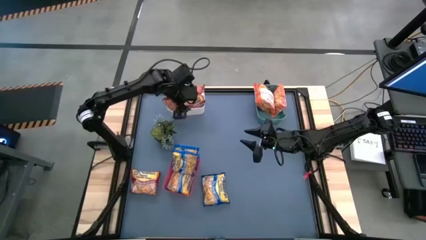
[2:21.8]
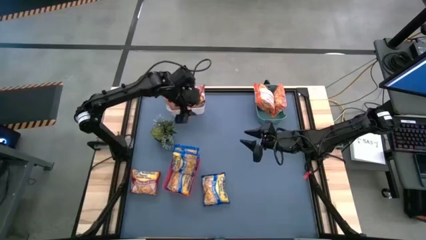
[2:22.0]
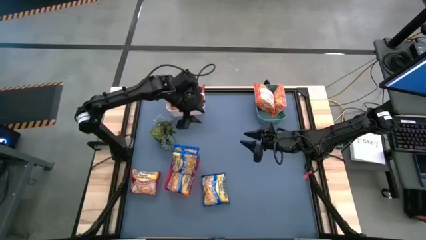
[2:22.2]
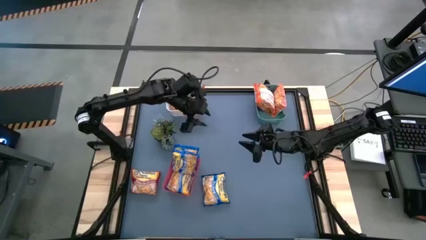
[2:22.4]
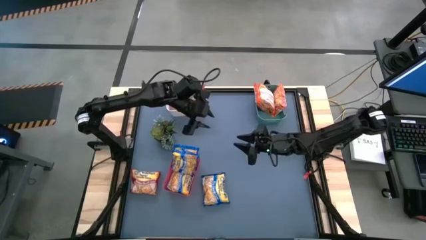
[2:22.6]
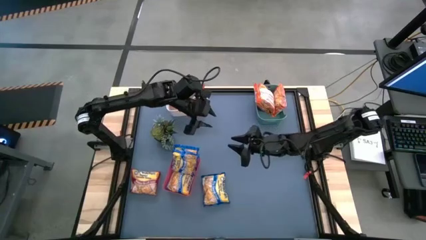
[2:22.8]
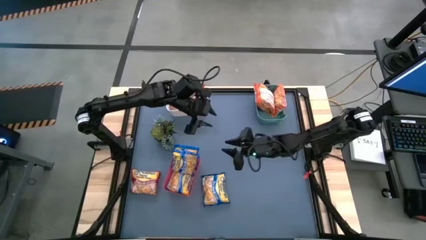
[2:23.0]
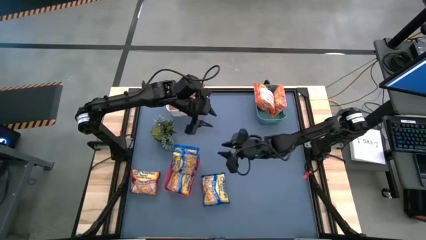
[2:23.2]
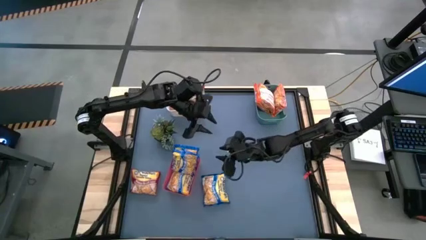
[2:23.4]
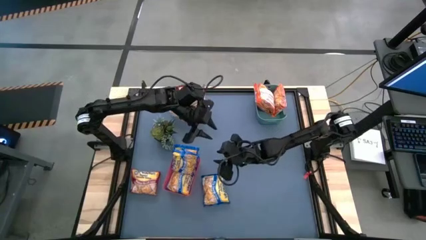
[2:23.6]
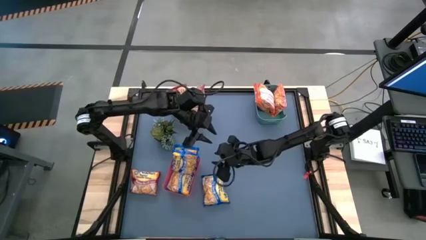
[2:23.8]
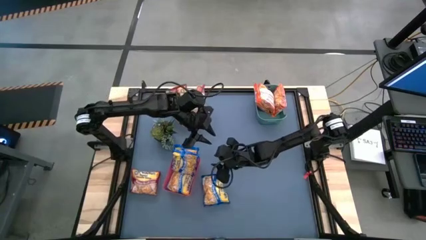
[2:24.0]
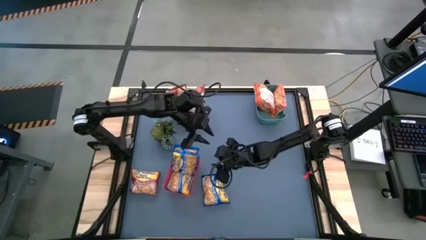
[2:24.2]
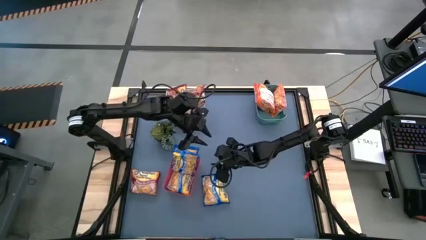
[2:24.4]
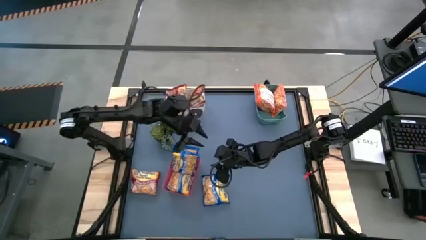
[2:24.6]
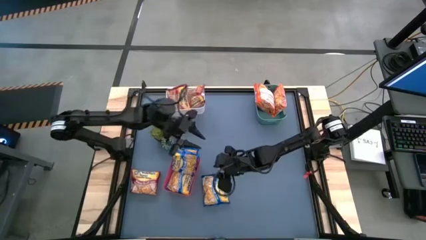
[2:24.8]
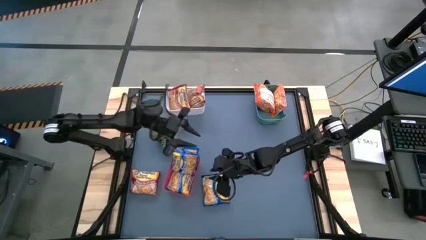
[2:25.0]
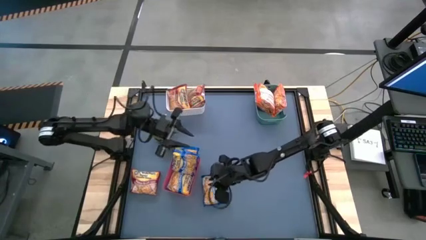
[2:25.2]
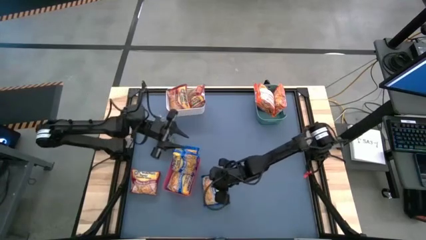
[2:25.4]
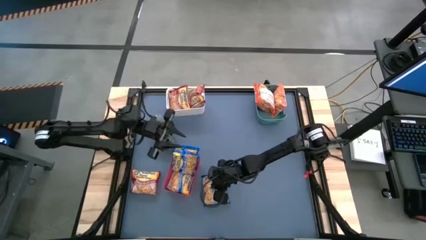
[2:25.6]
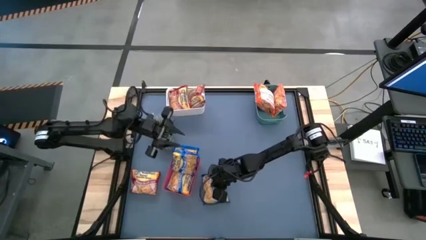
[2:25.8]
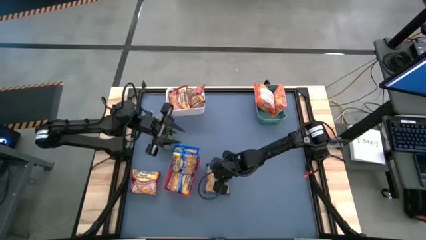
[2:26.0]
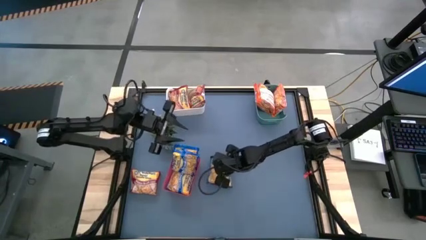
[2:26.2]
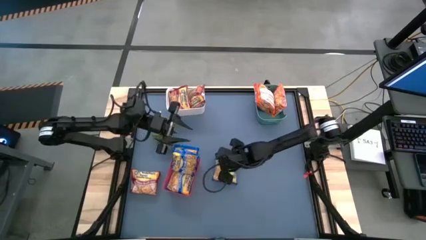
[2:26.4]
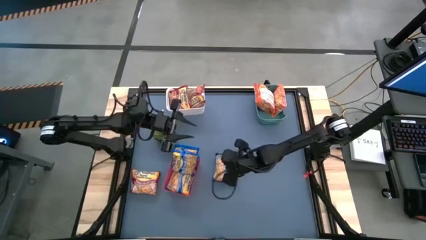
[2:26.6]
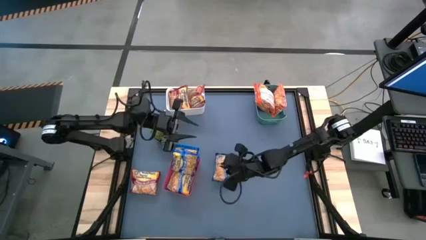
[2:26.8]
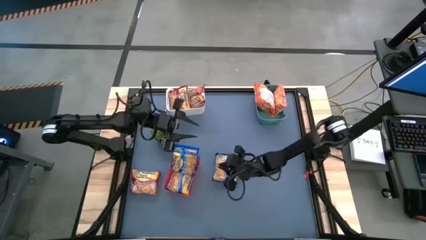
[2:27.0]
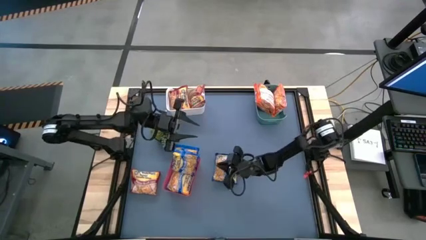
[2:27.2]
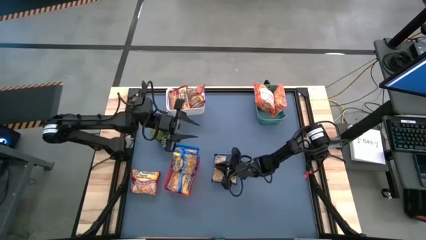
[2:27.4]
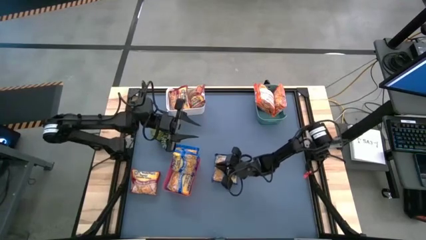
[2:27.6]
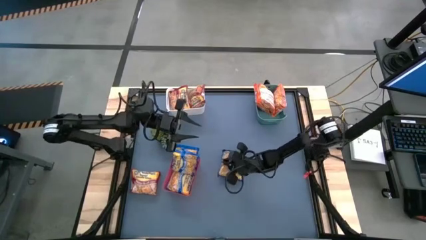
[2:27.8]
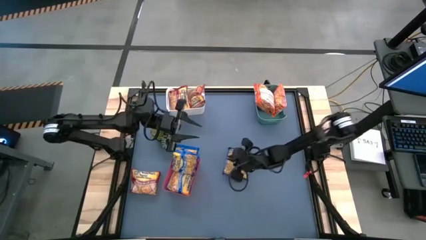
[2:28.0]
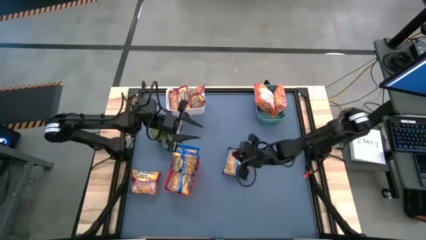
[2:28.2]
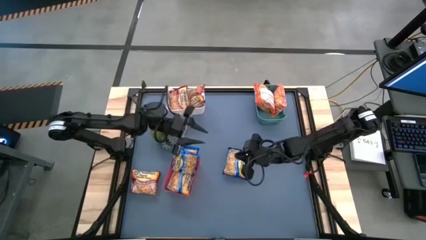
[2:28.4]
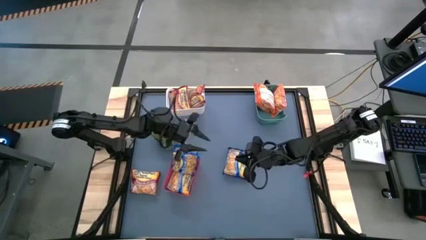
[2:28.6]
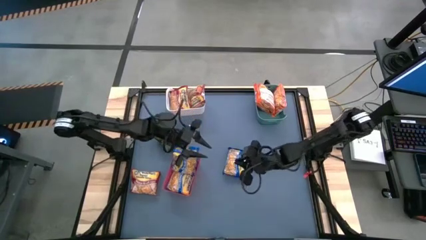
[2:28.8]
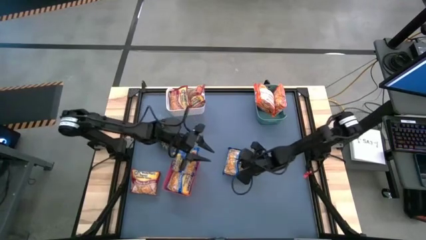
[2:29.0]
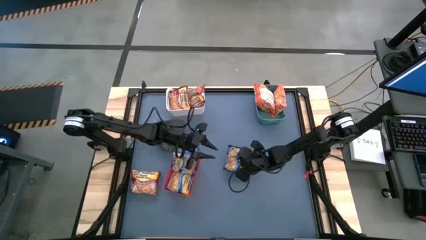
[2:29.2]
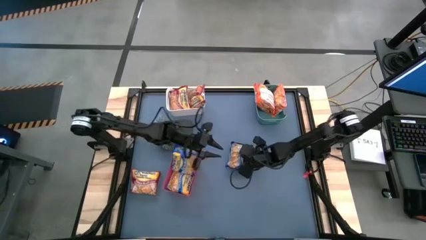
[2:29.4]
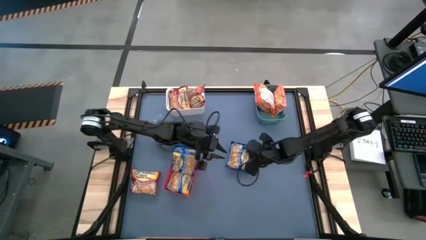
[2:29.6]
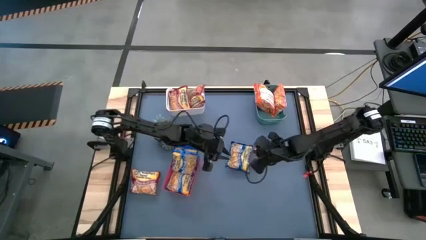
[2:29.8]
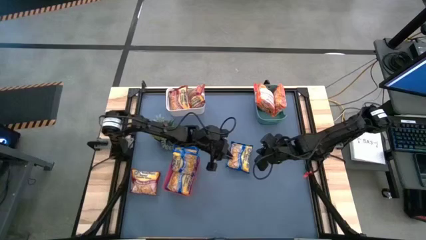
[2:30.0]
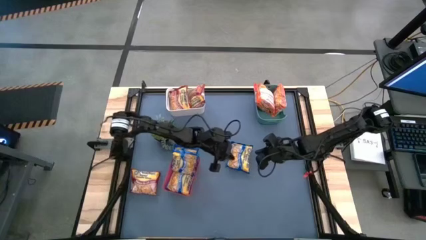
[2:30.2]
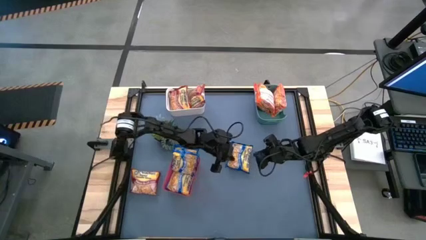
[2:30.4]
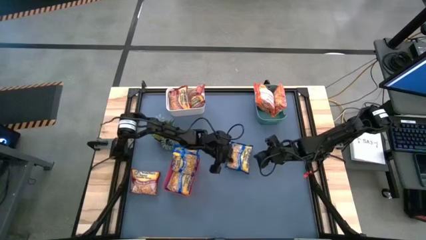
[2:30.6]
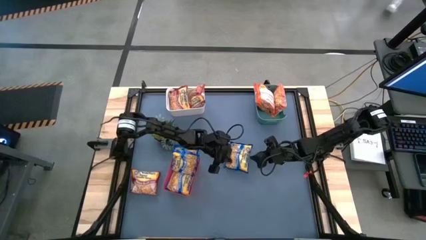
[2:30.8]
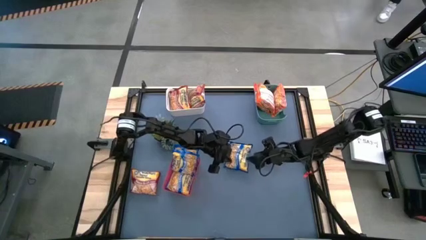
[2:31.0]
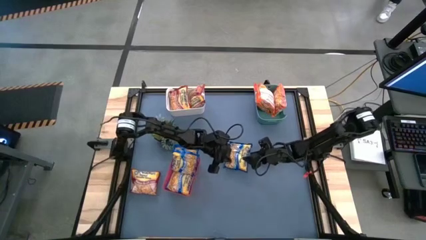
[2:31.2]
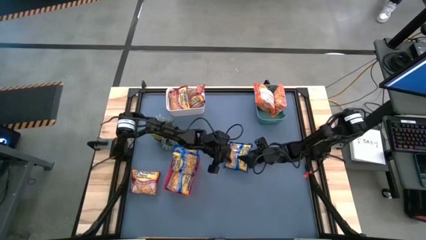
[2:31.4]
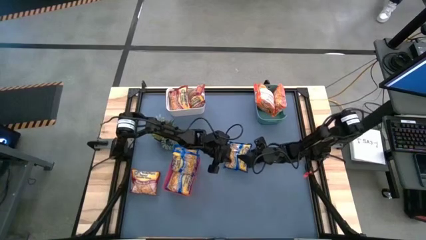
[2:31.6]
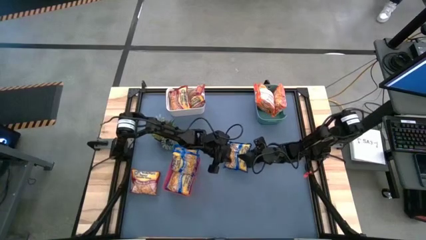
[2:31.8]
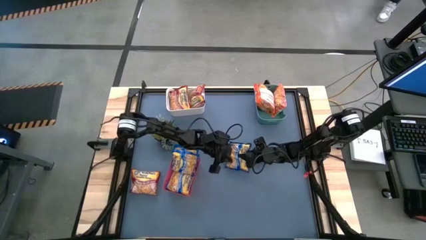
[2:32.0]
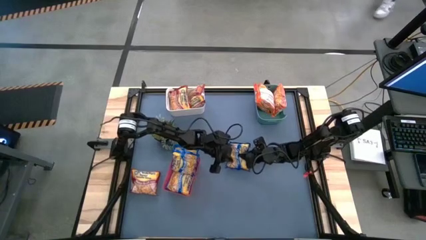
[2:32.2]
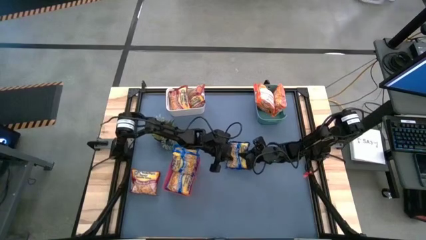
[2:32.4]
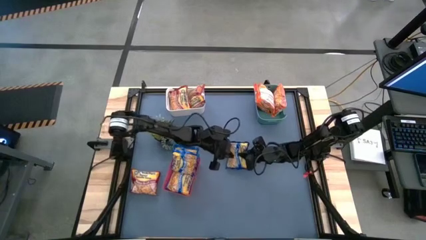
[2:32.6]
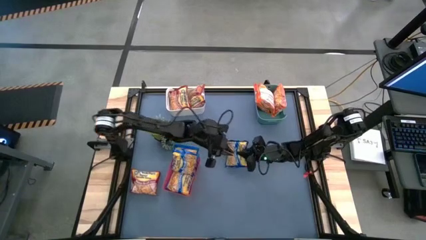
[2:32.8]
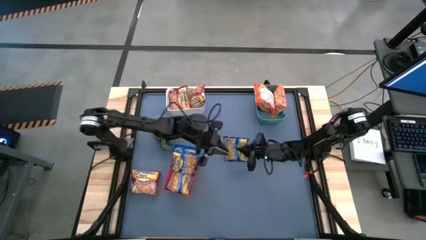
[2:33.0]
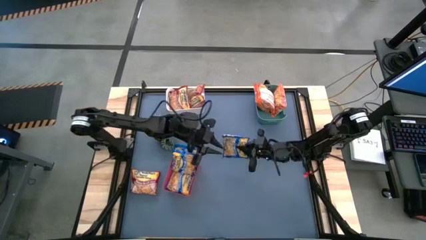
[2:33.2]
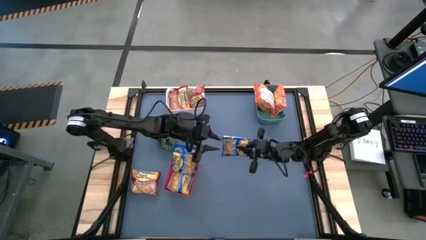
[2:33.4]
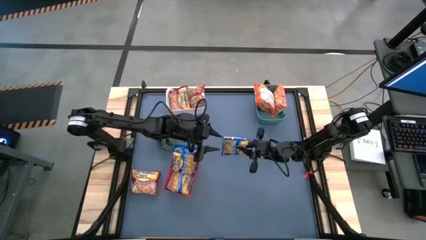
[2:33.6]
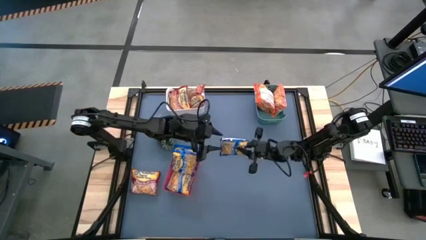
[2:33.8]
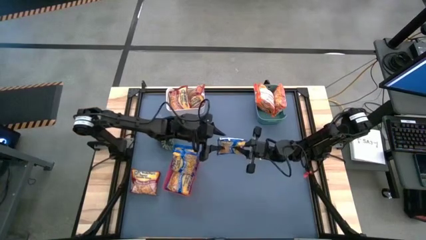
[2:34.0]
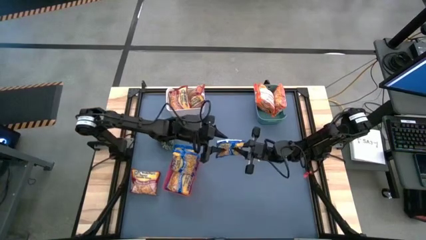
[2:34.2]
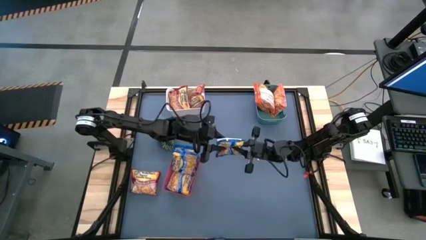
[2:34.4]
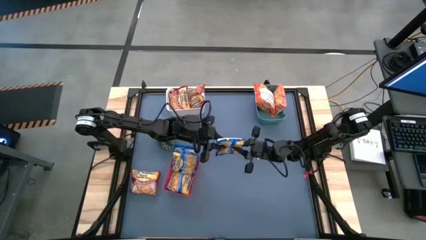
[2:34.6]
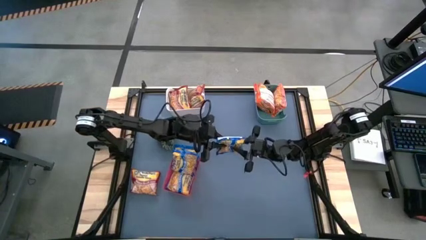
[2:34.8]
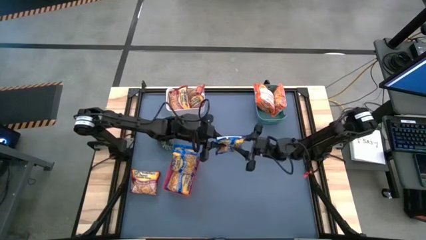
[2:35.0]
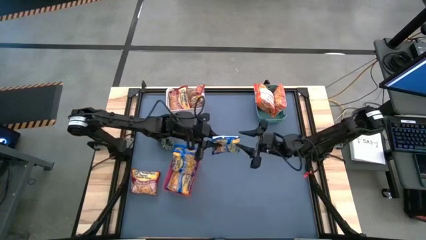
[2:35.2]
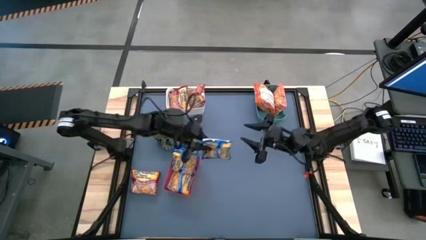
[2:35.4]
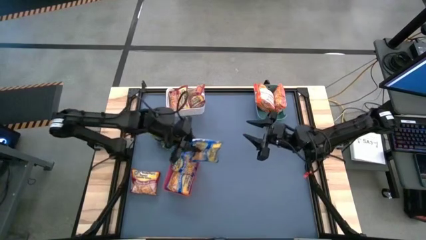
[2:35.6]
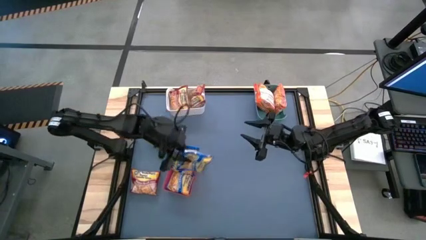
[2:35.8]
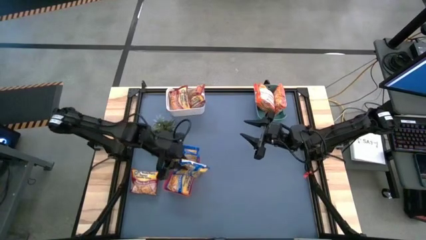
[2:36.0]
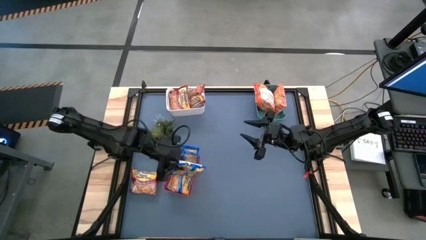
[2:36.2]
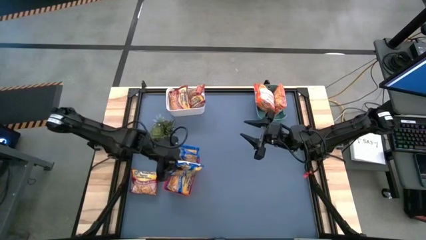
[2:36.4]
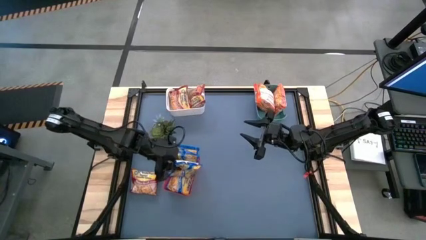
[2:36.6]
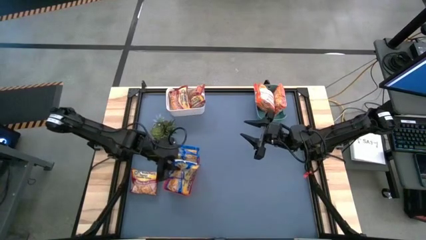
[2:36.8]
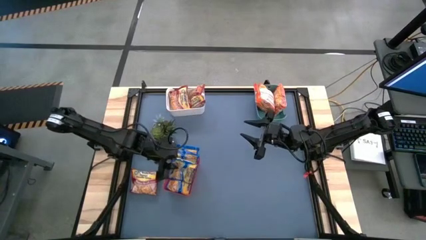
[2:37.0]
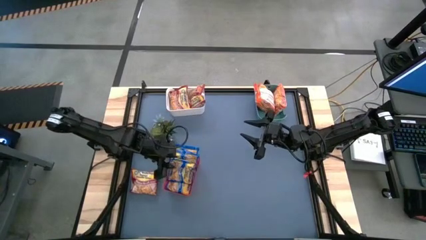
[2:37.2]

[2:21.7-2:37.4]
Task: Sort Maruchan noodles
Put the blue noodle pack into the red bin

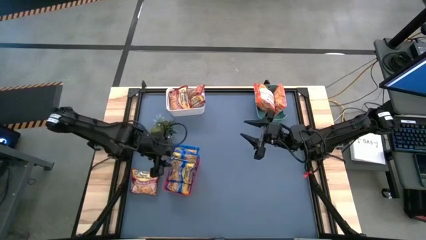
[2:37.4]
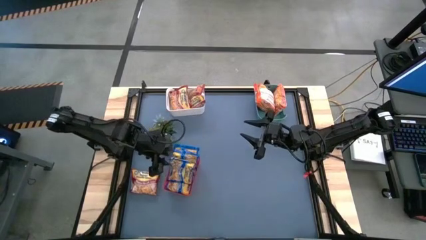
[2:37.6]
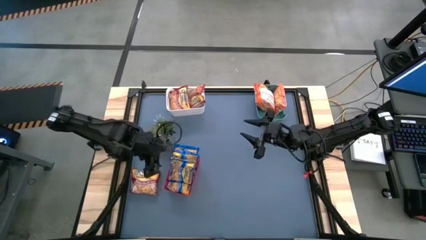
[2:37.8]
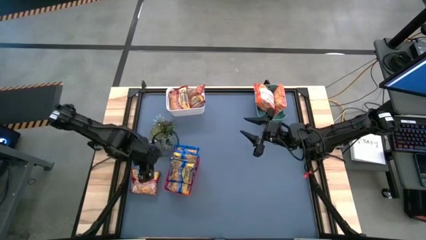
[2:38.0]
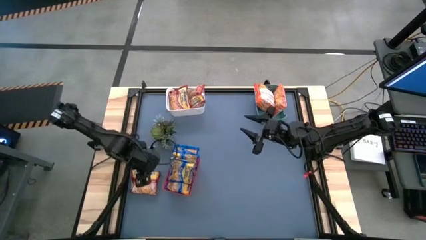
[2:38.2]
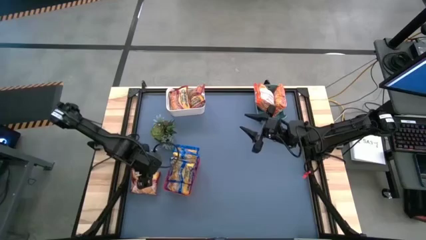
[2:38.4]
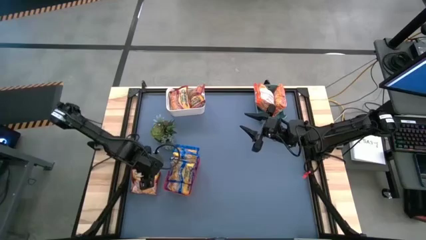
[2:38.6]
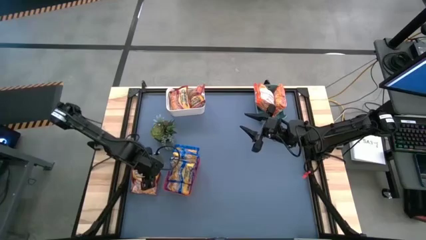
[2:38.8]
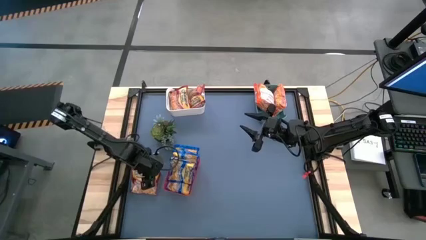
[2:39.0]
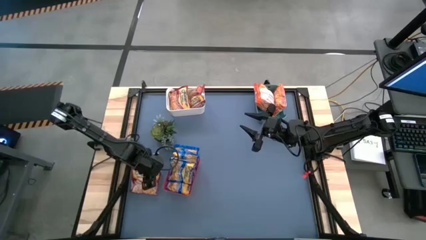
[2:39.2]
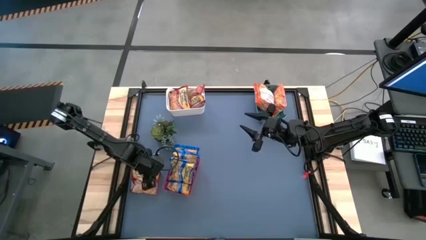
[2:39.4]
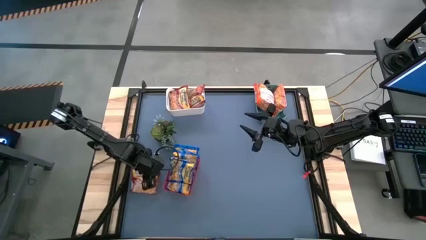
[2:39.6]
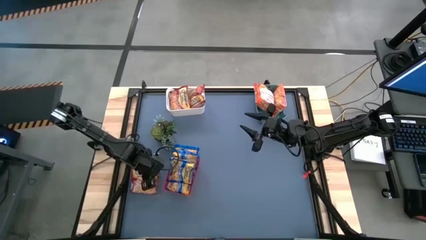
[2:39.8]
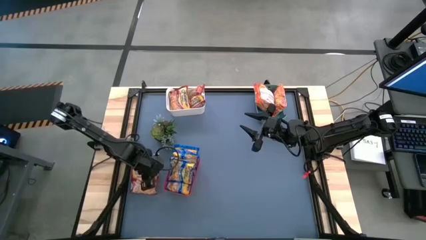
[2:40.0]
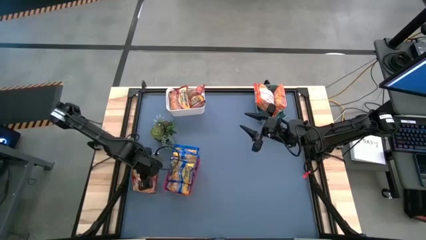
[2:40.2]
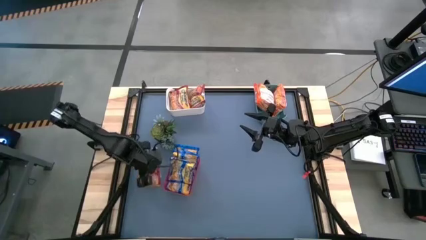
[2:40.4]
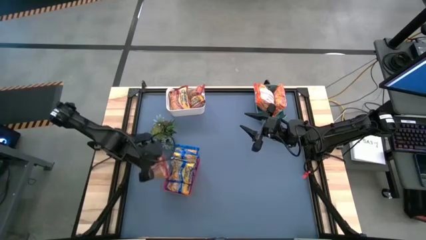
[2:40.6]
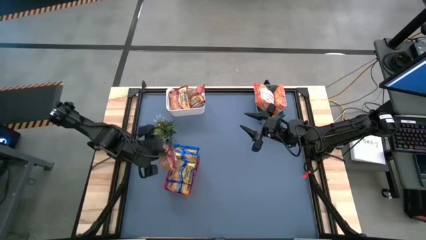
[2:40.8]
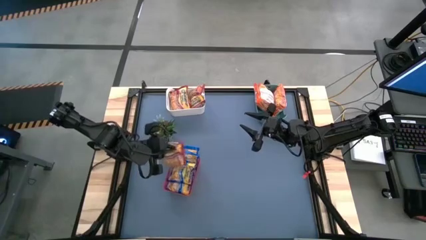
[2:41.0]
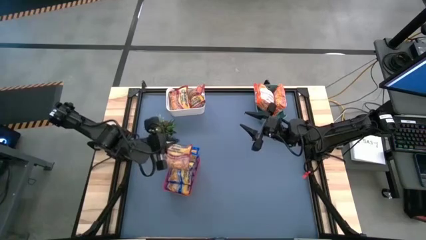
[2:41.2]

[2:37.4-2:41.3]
Put the red noodle pack into the white bin
